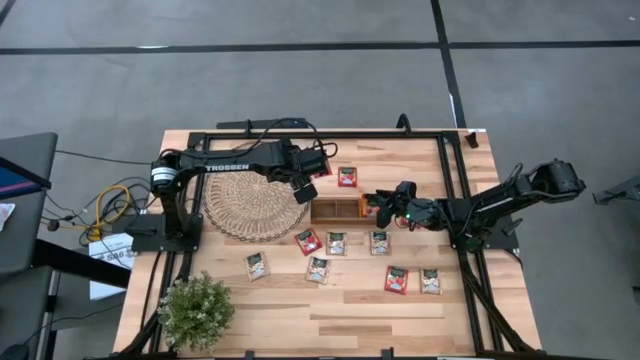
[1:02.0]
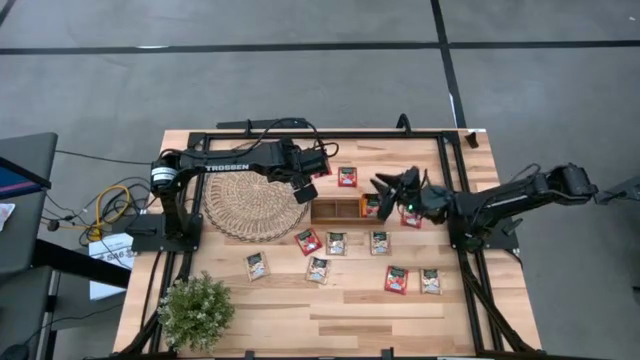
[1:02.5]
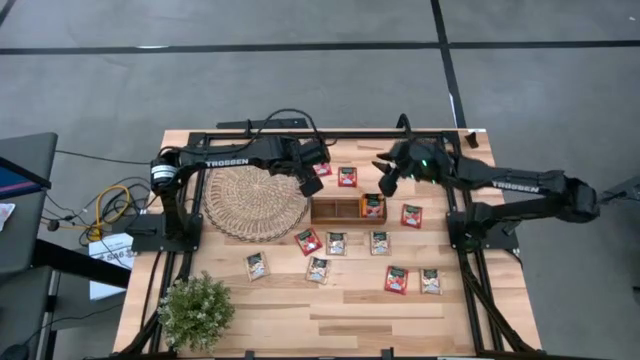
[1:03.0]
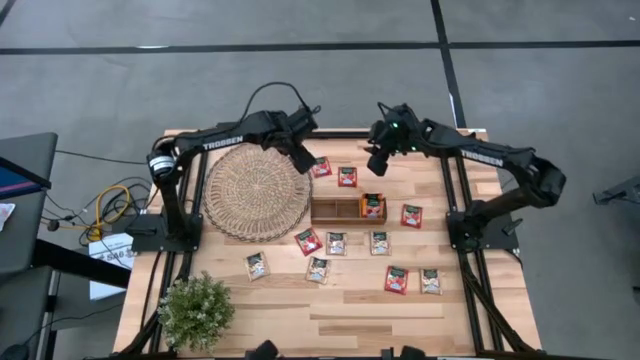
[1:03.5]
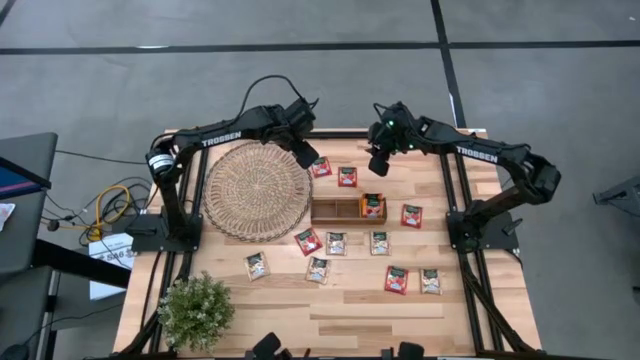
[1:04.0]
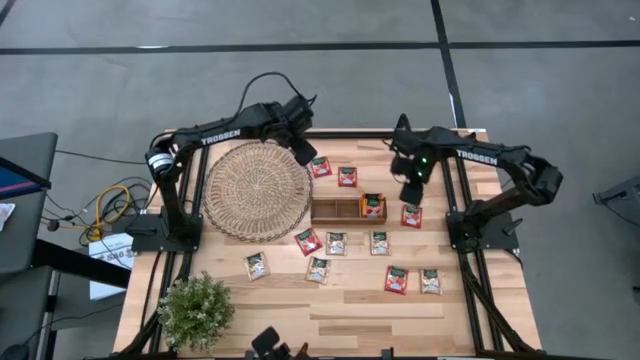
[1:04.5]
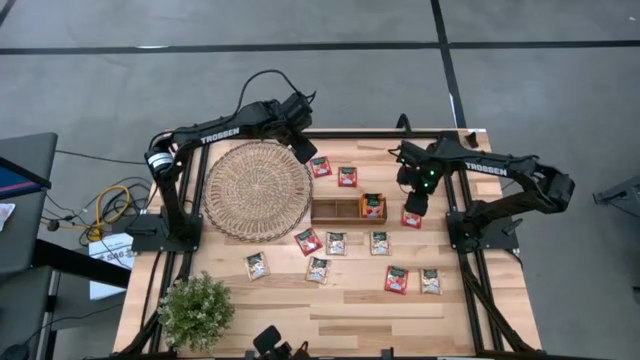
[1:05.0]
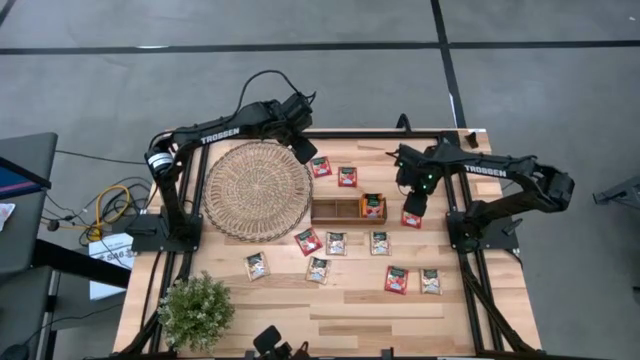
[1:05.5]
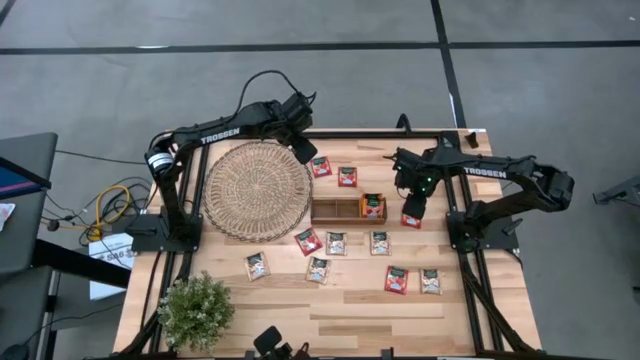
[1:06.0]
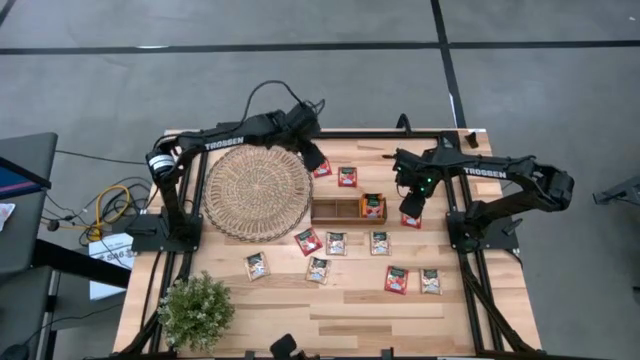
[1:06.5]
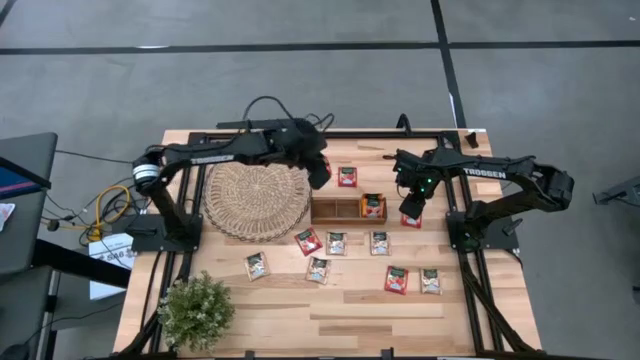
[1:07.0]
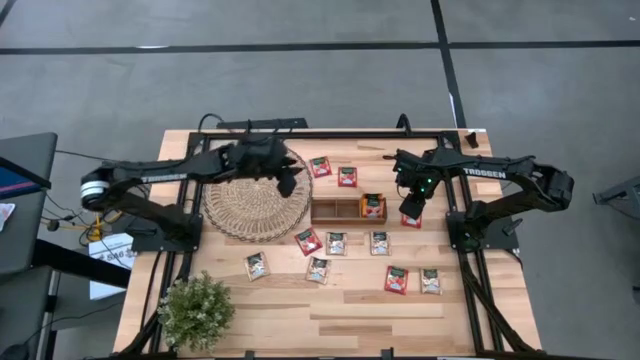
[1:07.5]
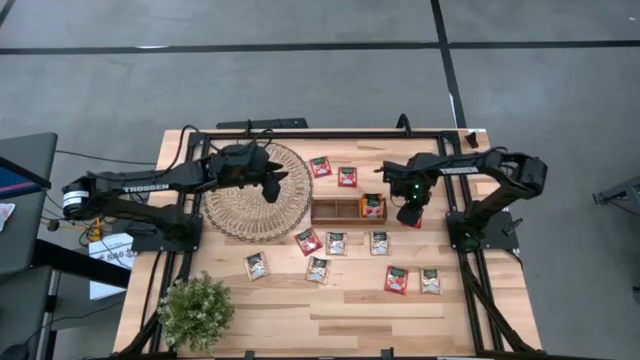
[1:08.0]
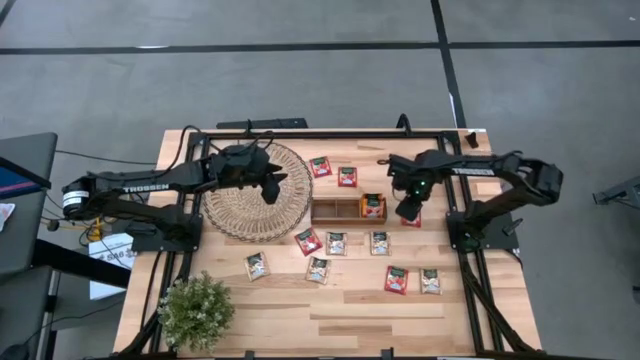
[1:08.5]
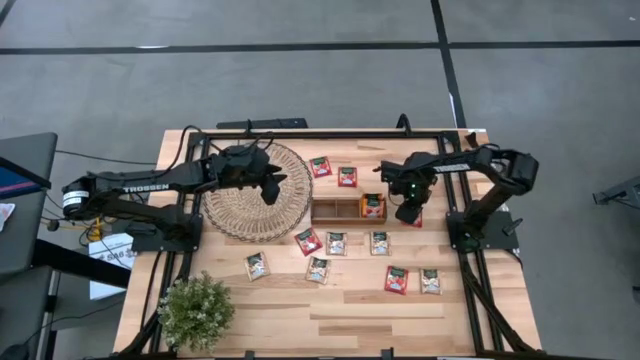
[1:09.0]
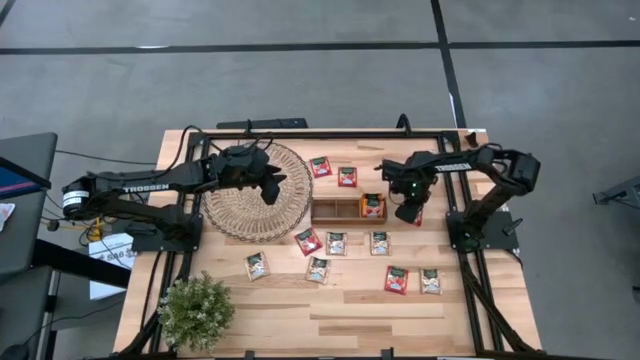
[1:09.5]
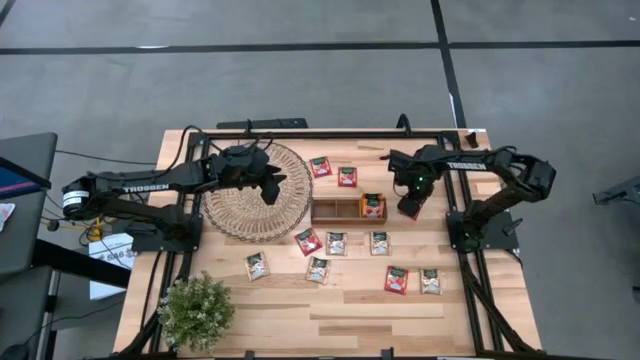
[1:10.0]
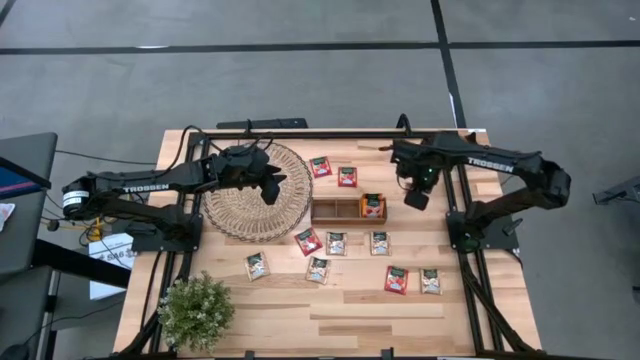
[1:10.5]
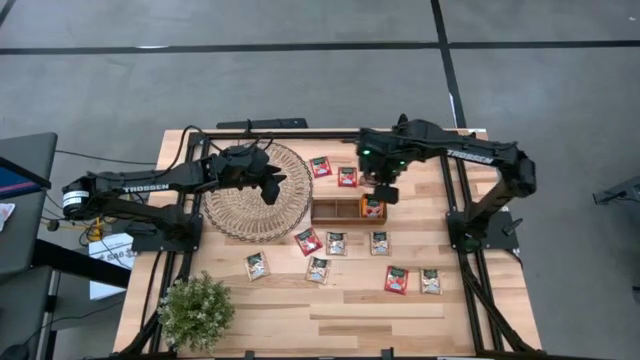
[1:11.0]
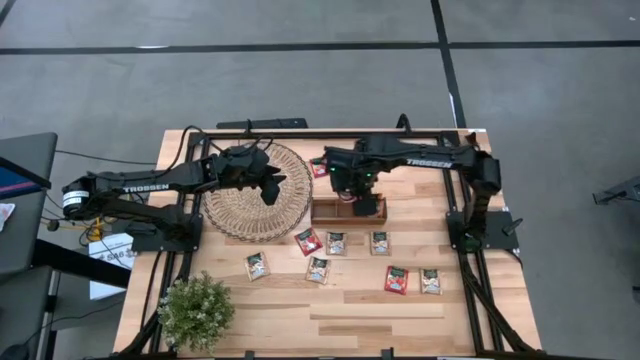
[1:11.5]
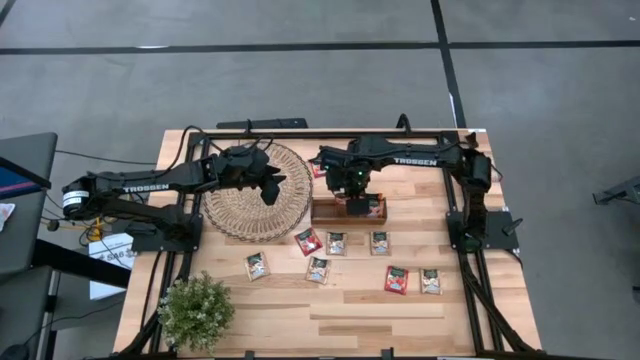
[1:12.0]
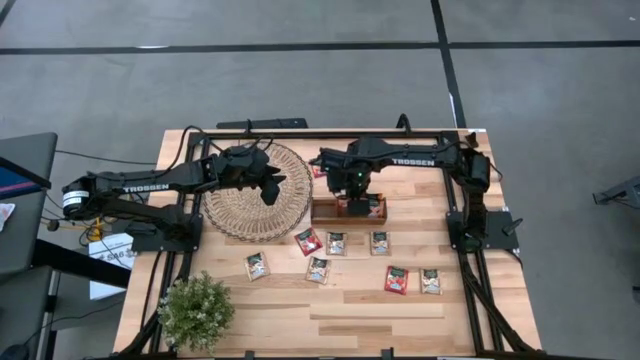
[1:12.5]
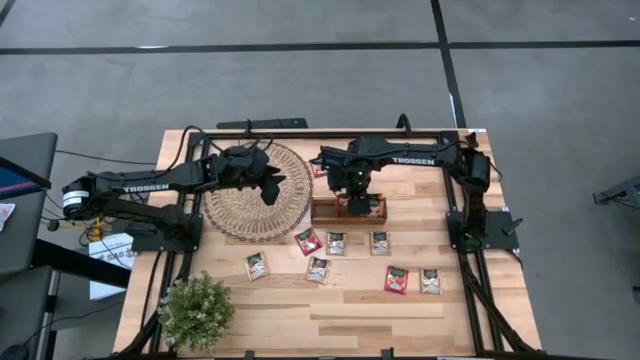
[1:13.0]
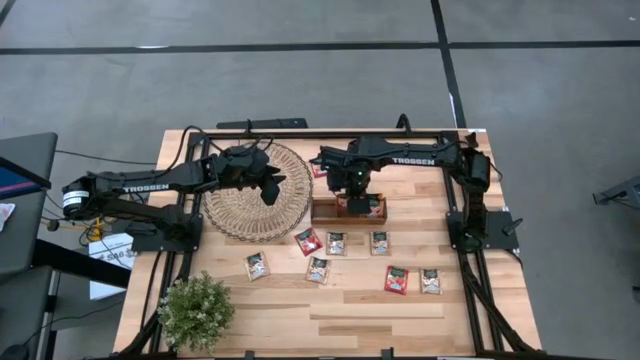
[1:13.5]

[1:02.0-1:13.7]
Task: Pick & Place Tea
Put the red tea bag into the middle section of the wooden organizer

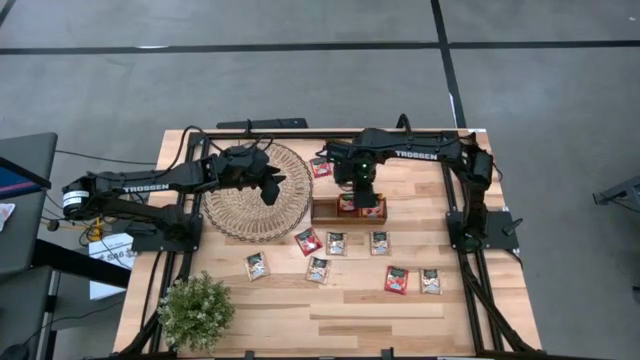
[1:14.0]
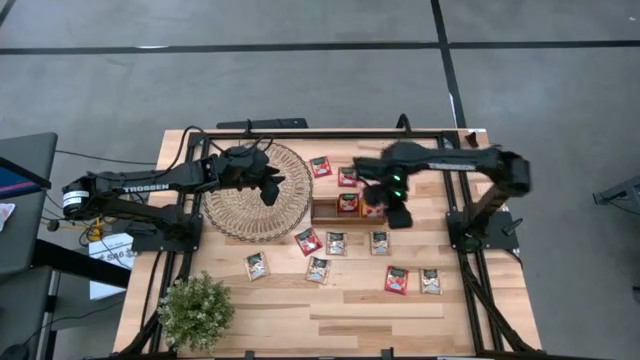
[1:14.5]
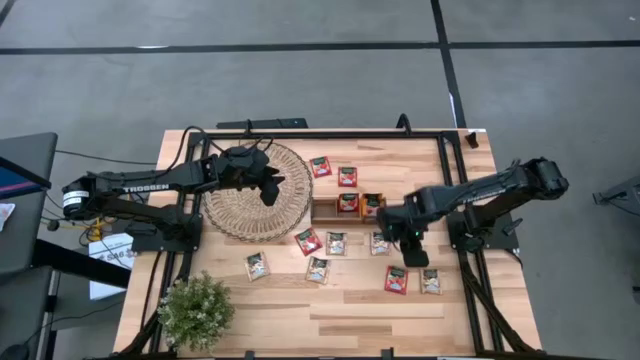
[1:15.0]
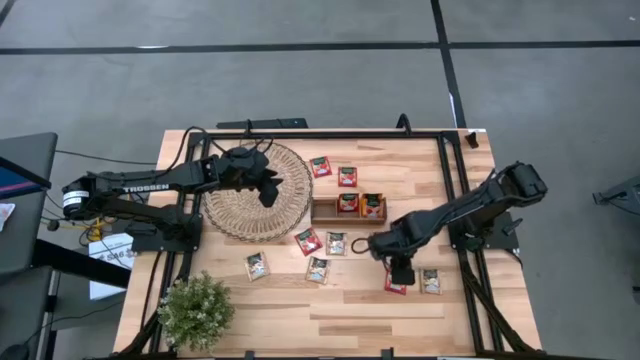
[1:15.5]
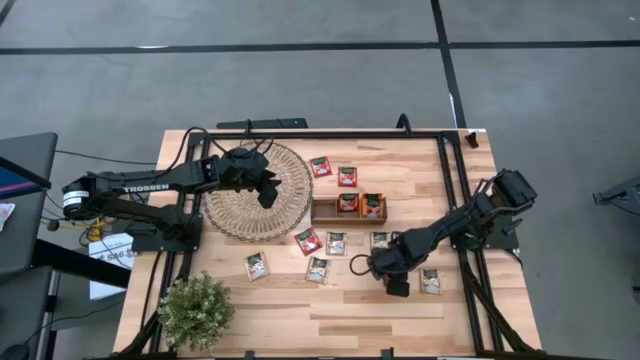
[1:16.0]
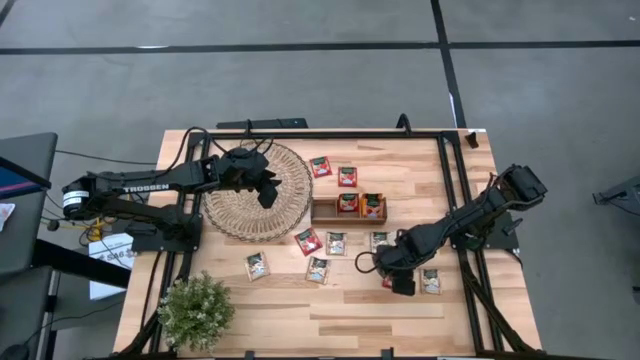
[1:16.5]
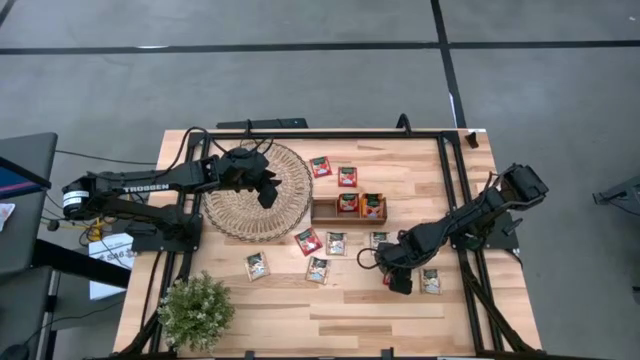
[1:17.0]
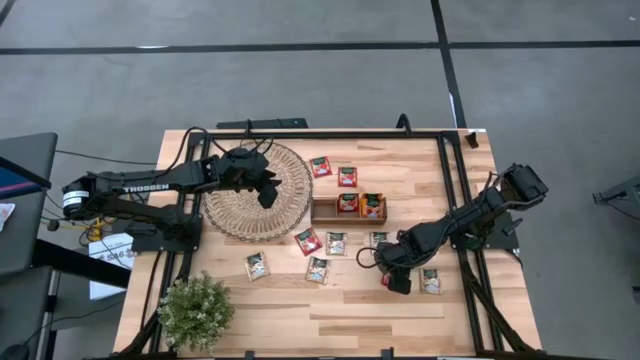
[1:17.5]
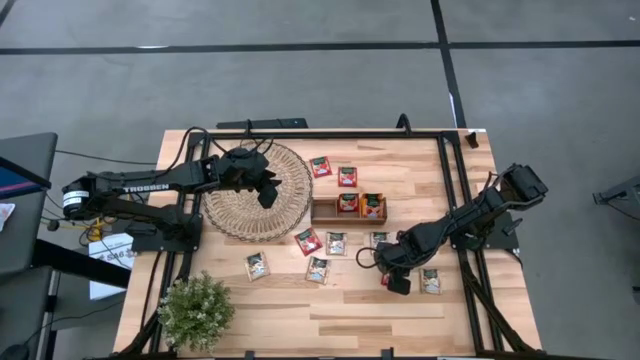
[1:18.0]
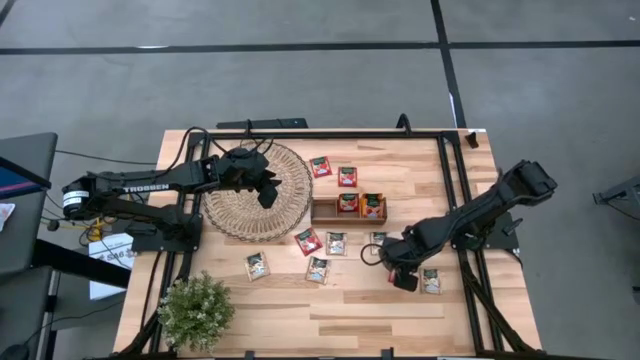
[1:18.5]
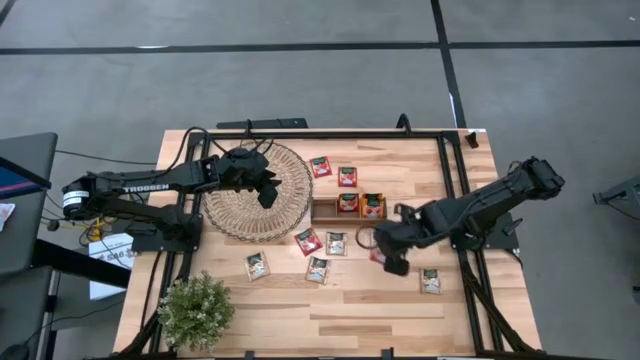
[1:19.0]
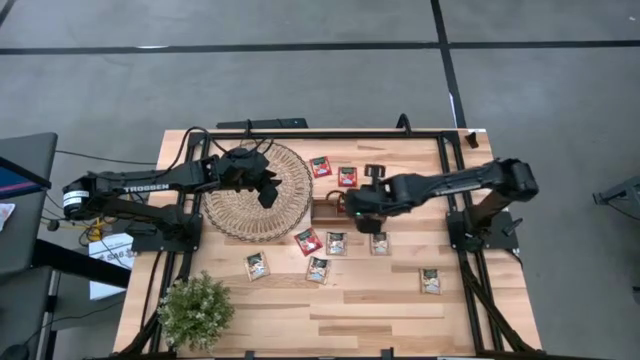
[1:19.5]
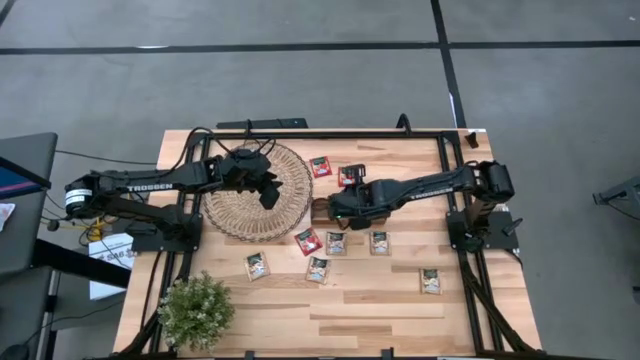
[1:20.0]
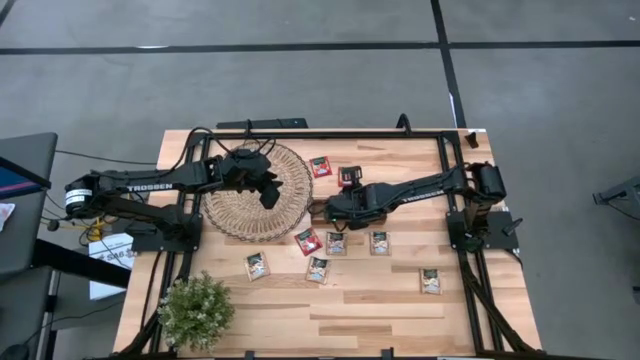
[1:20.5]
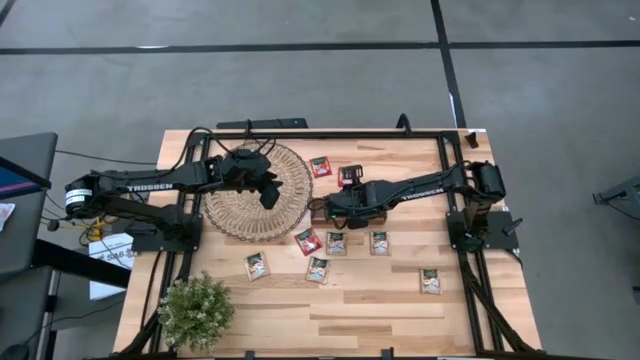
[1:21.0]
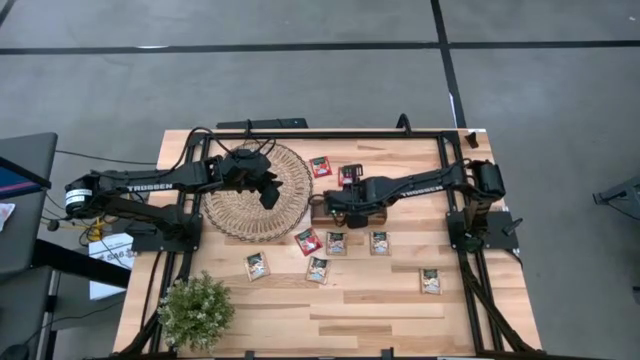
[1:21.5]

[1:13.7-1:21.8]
Put the red tea bag into the middle section of the wooden organizer
